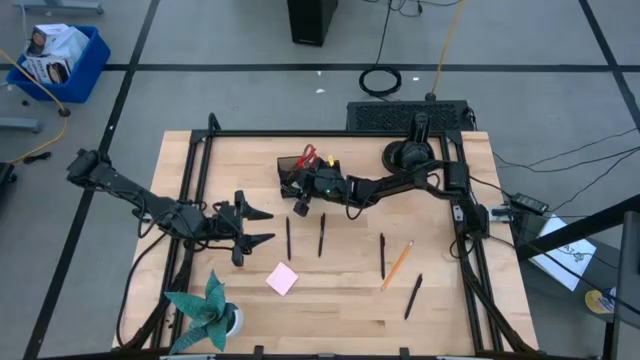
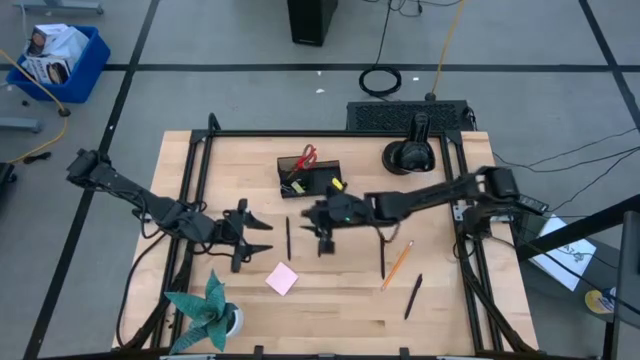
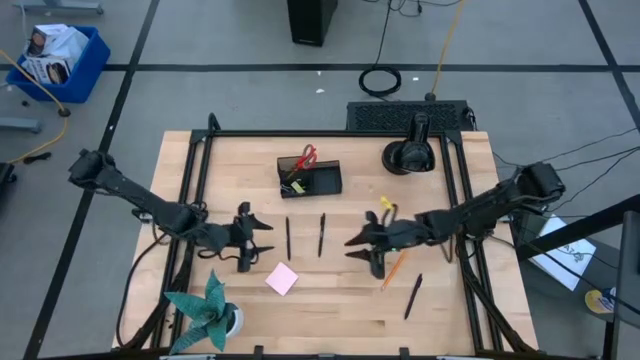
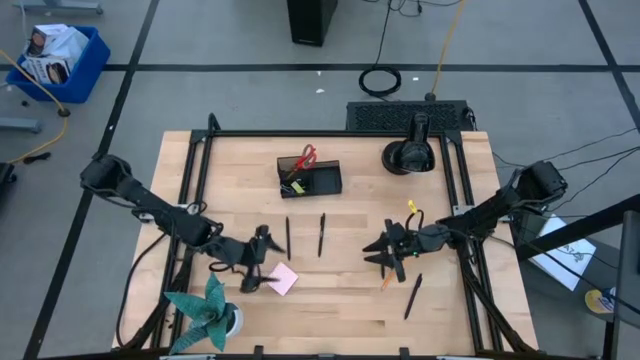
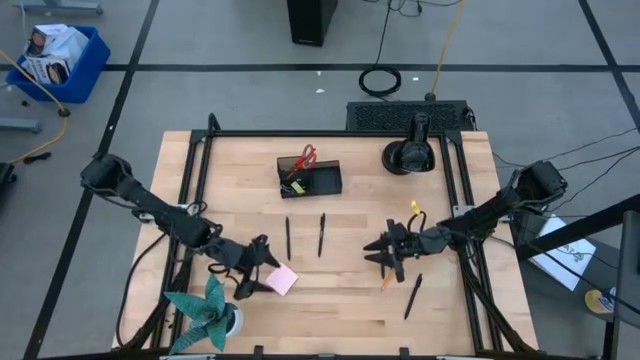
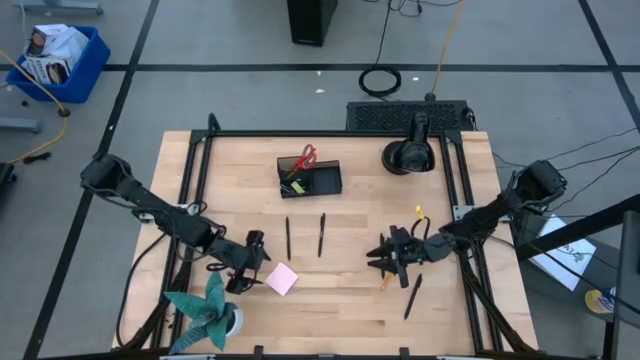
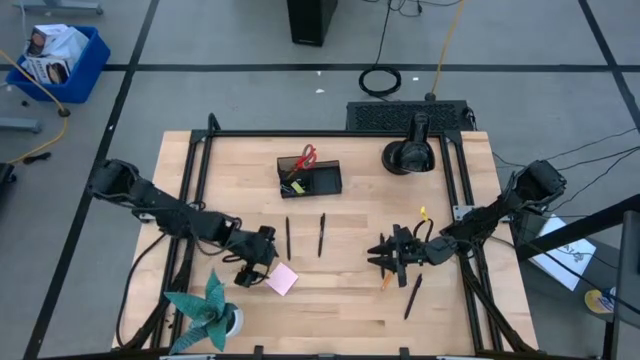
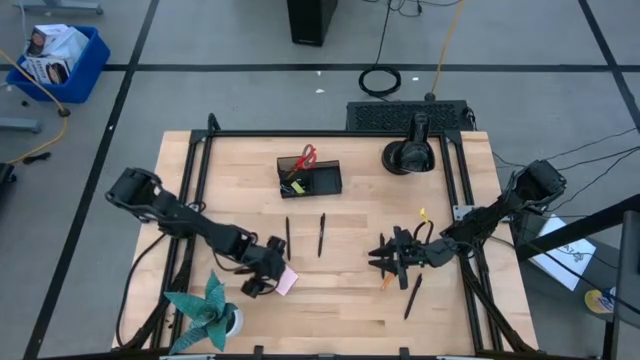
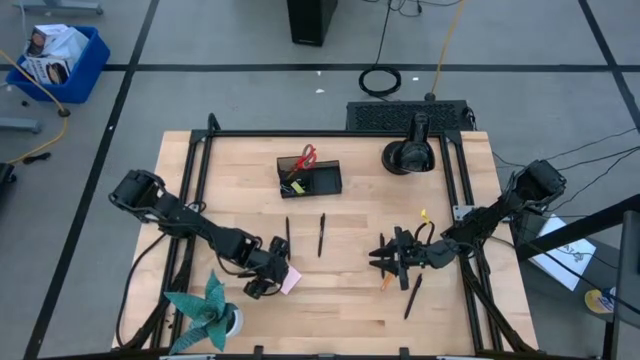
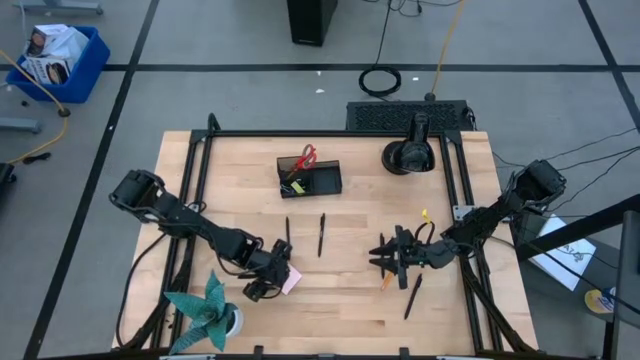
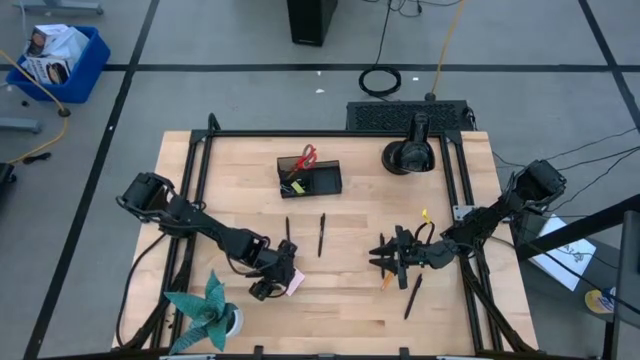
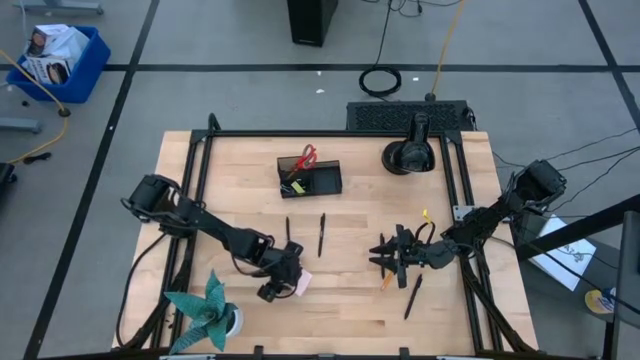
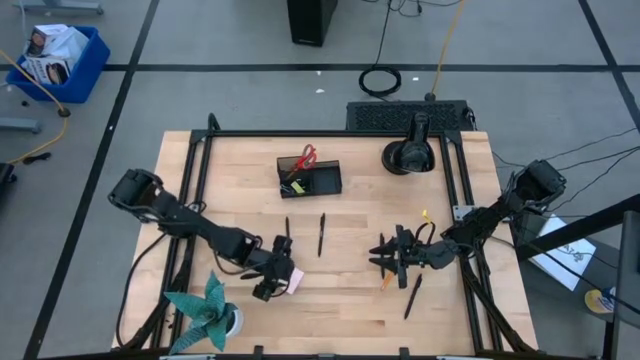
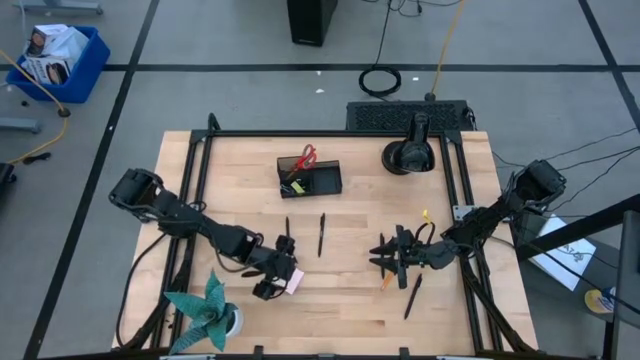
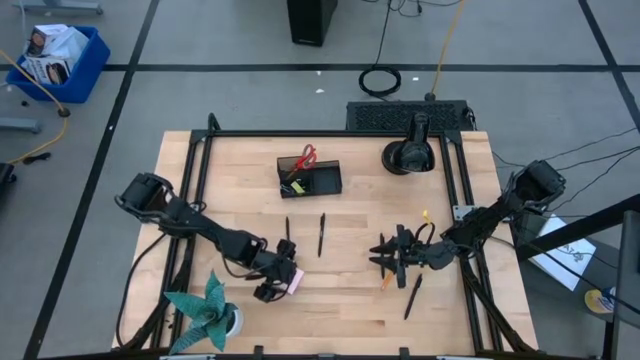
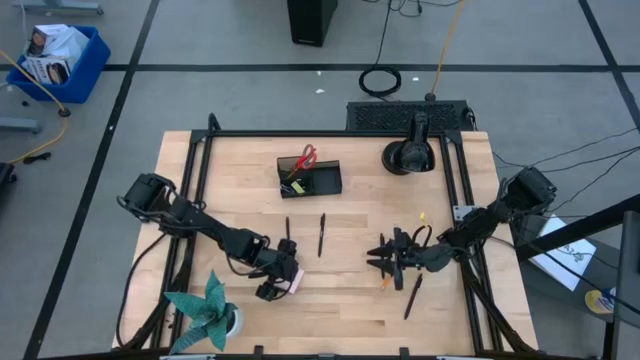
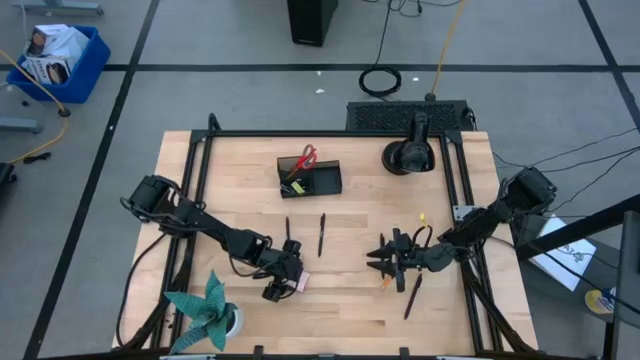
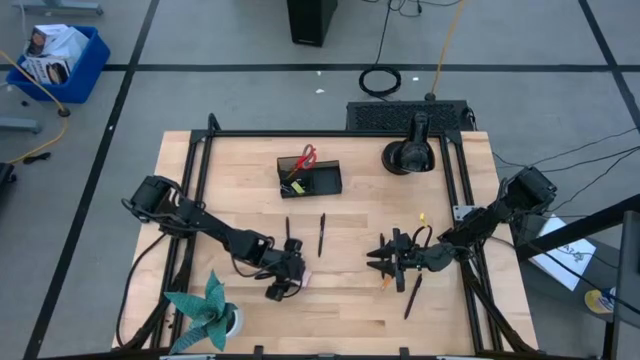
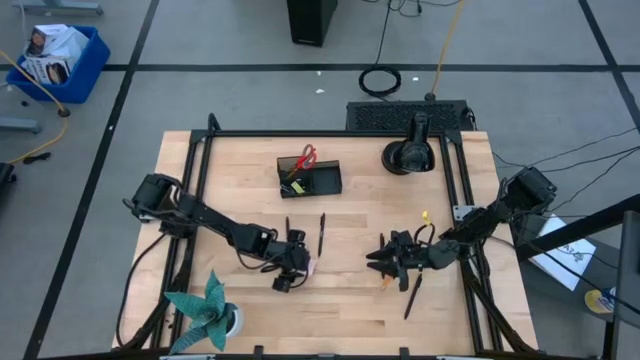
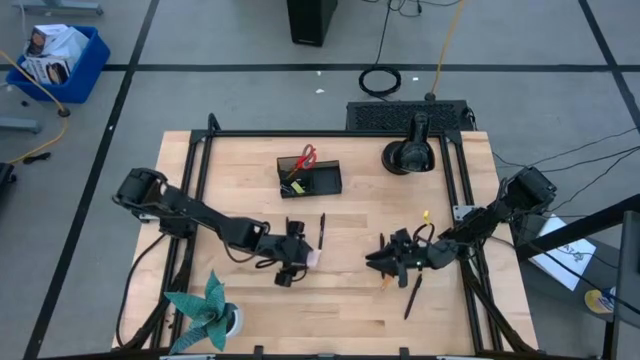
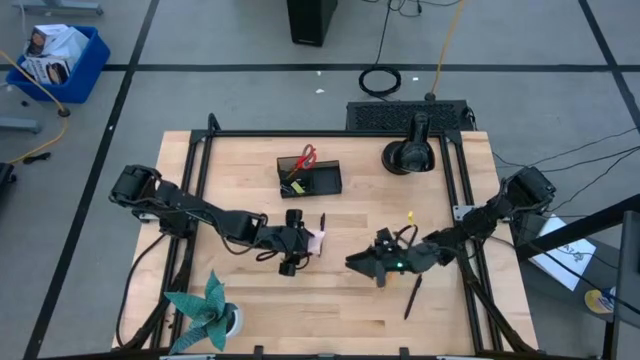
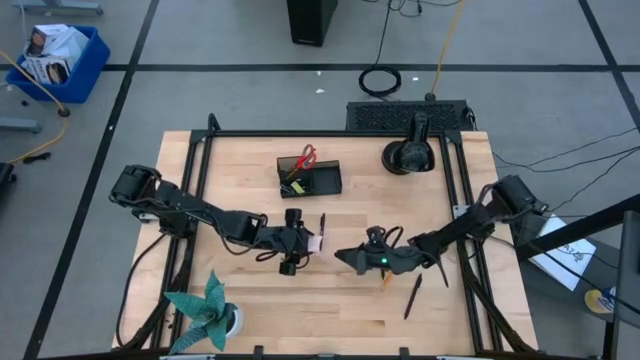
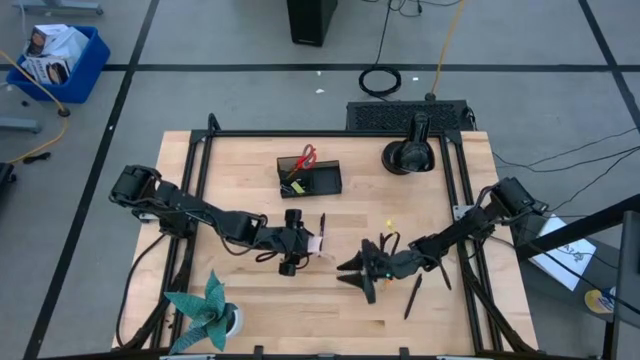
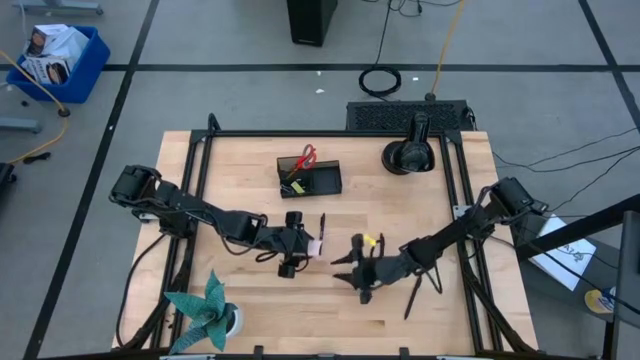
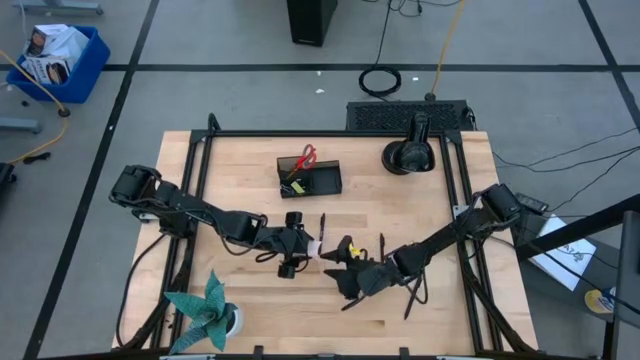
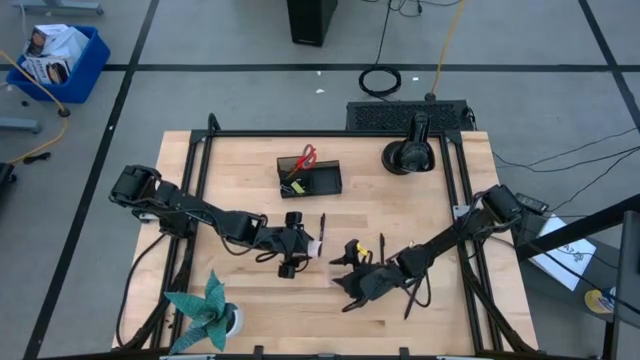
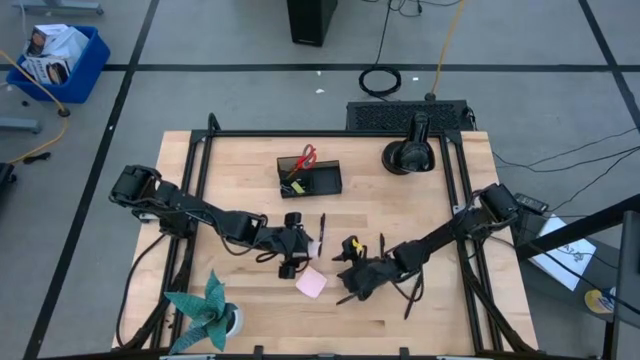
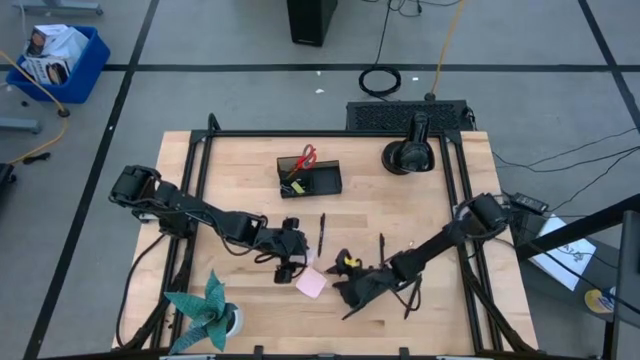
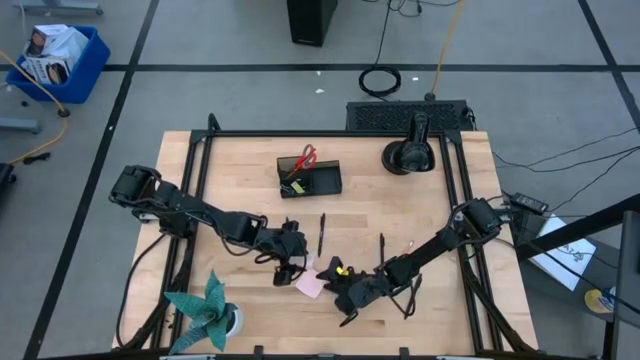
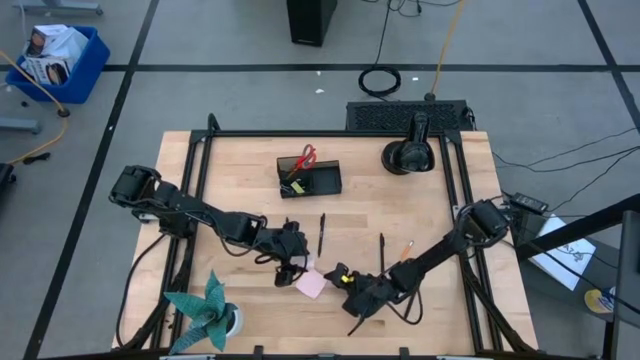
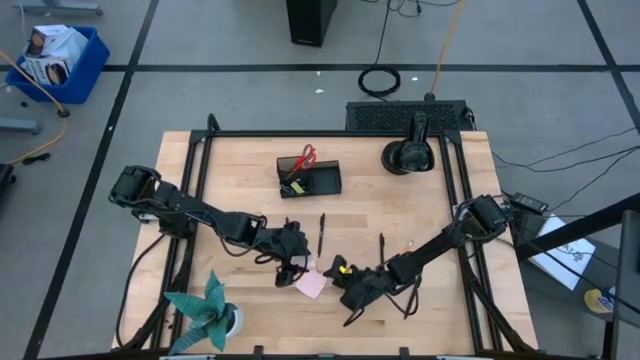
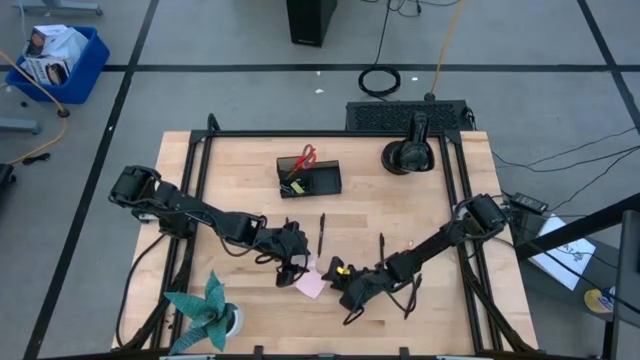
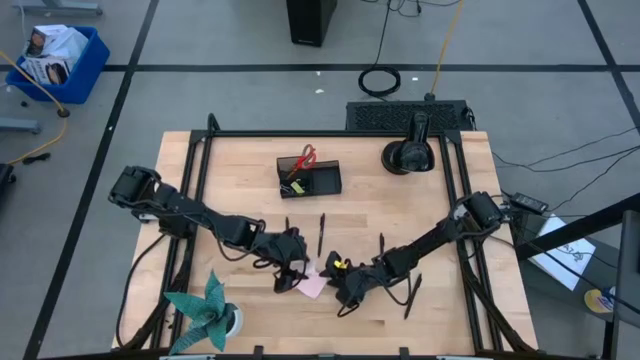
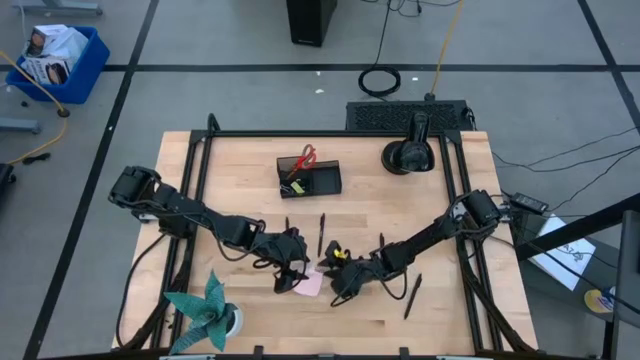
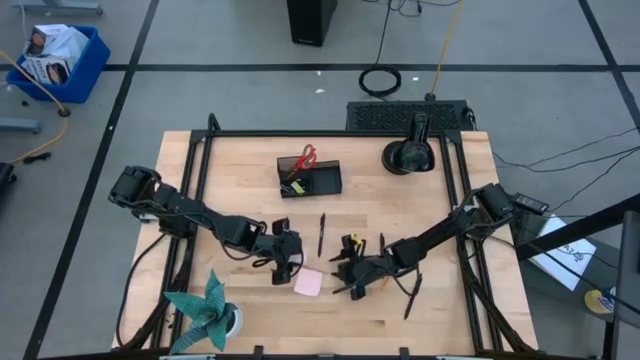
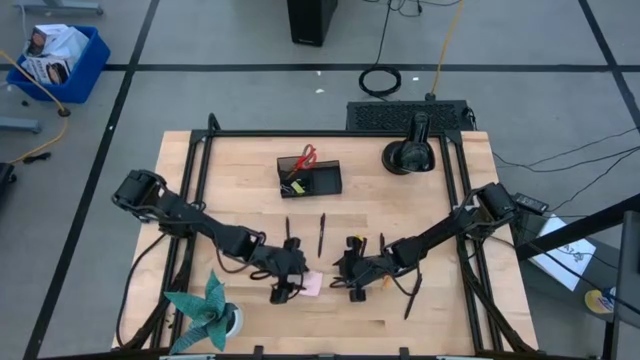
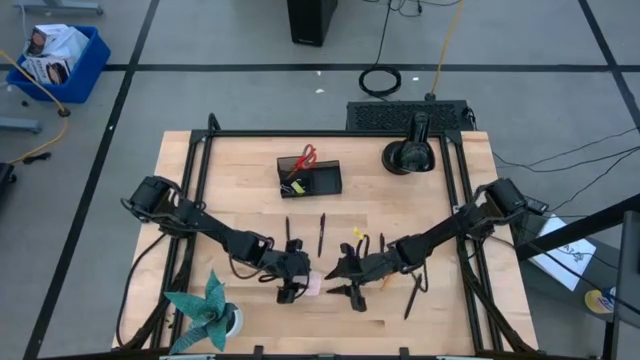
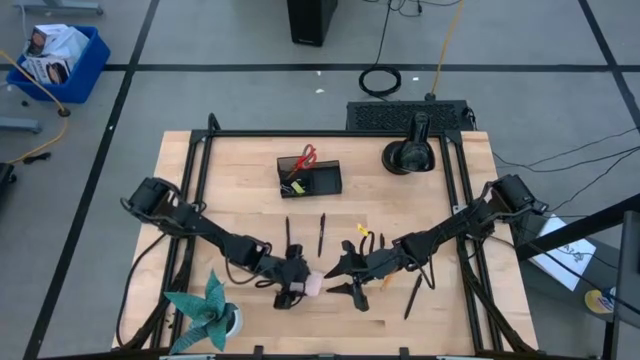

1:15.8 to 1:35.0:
Task: Pick and place office supplies into organizer
Put the pink sticky notes into the black desk organizer
